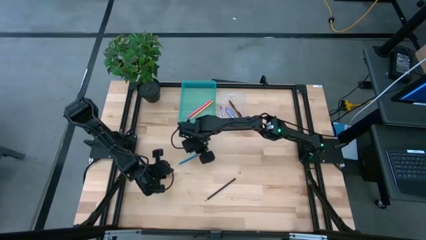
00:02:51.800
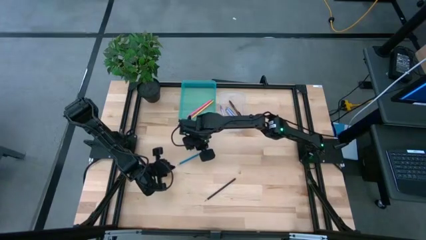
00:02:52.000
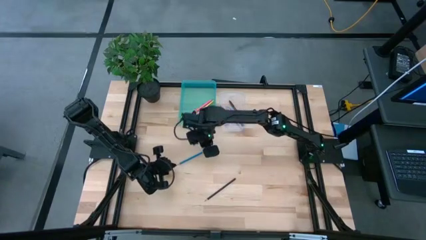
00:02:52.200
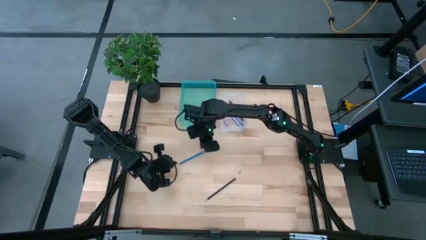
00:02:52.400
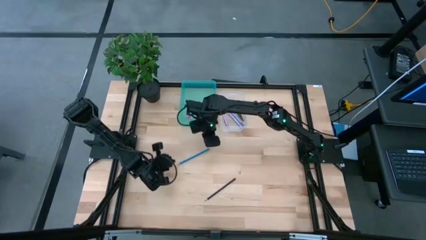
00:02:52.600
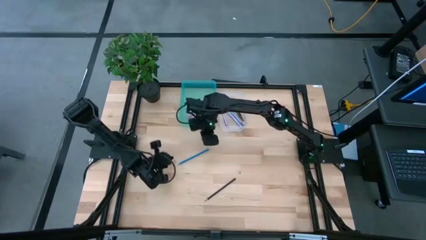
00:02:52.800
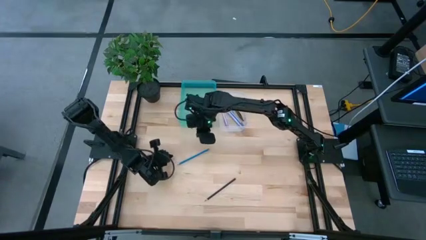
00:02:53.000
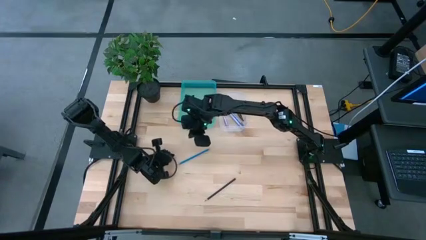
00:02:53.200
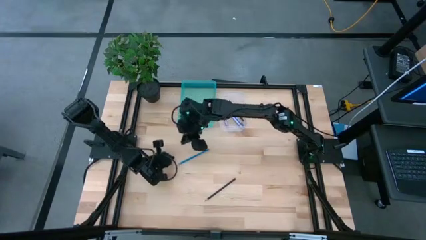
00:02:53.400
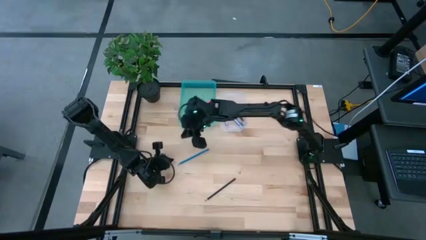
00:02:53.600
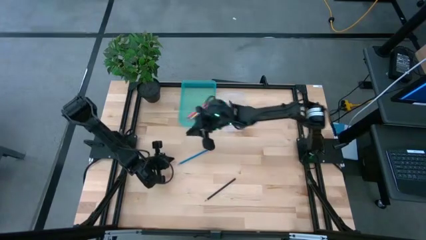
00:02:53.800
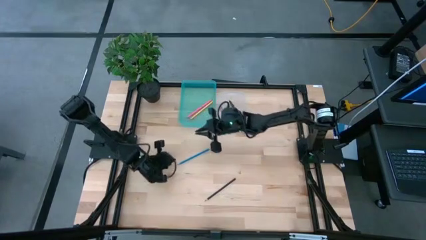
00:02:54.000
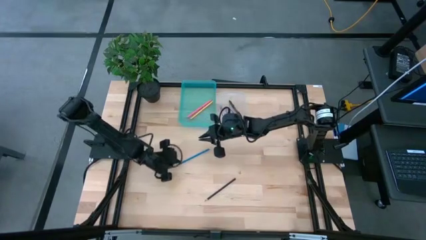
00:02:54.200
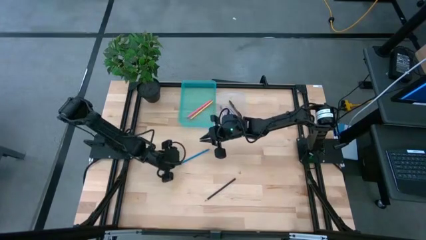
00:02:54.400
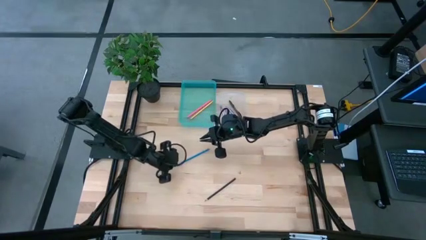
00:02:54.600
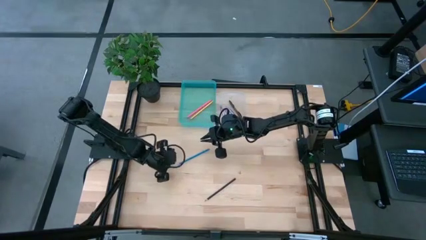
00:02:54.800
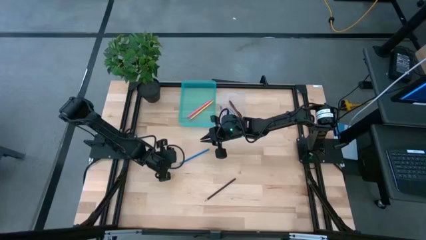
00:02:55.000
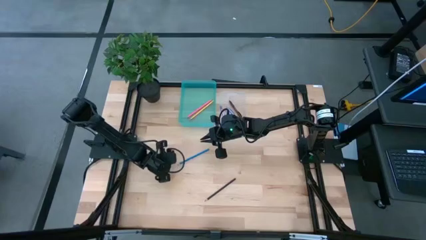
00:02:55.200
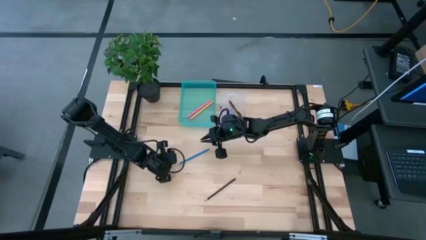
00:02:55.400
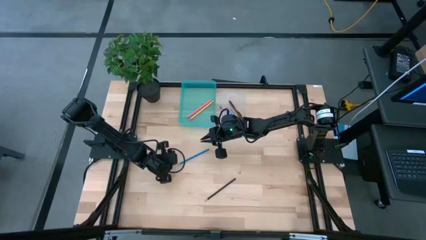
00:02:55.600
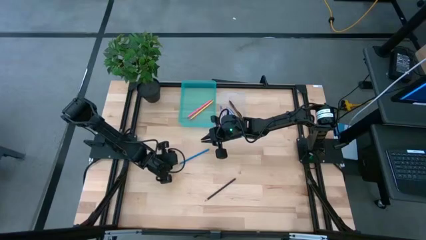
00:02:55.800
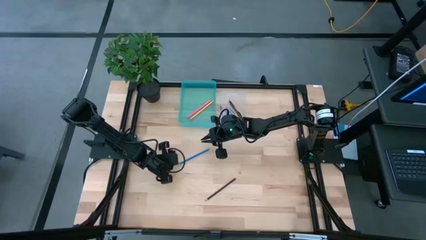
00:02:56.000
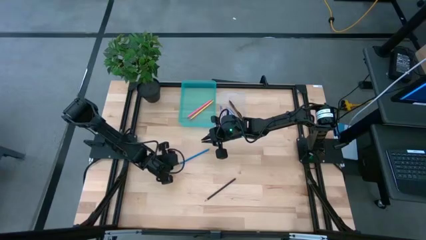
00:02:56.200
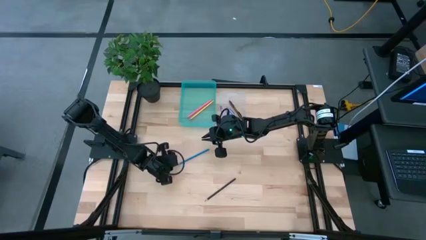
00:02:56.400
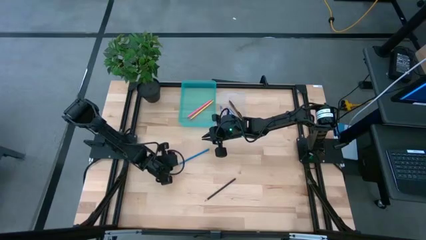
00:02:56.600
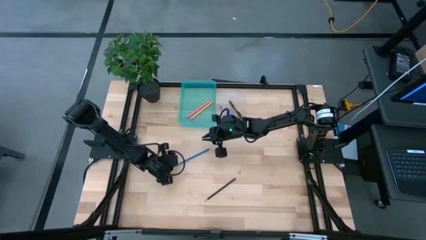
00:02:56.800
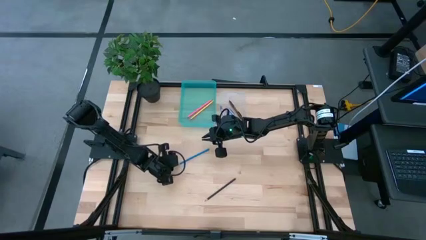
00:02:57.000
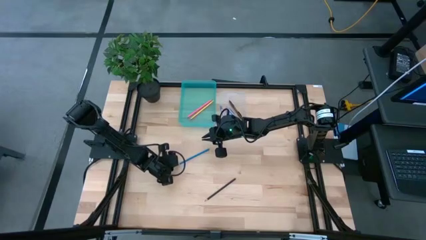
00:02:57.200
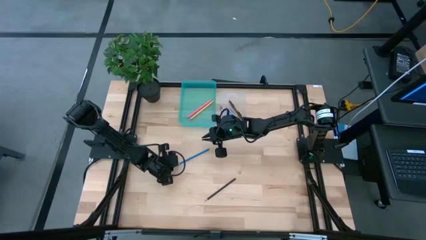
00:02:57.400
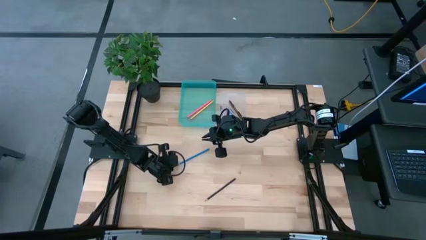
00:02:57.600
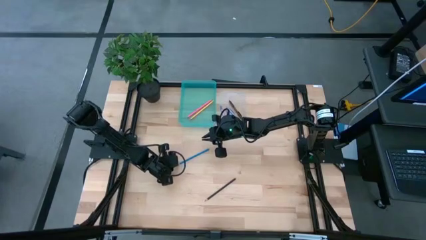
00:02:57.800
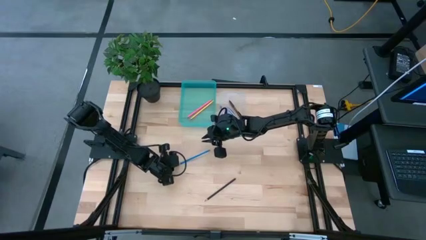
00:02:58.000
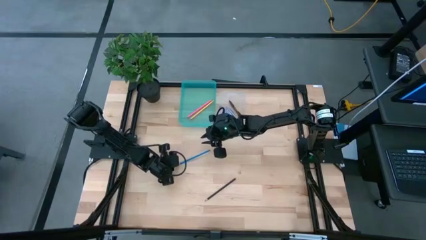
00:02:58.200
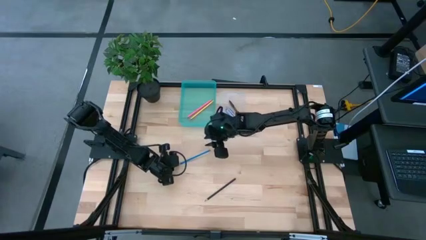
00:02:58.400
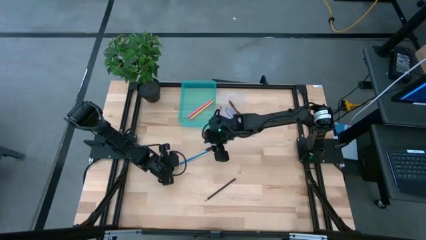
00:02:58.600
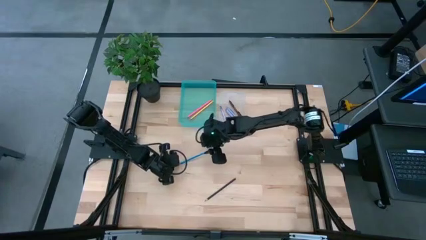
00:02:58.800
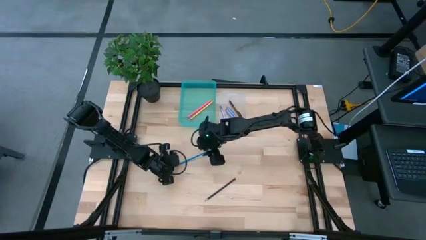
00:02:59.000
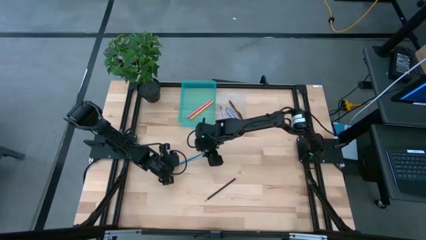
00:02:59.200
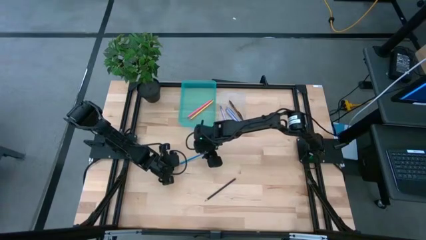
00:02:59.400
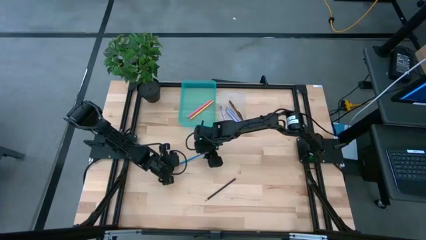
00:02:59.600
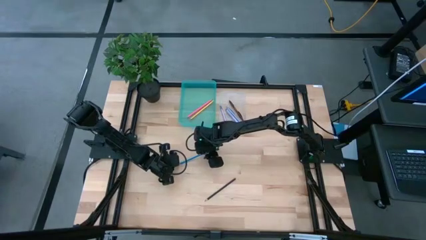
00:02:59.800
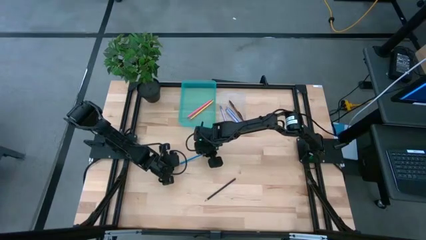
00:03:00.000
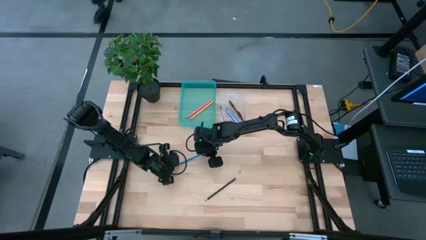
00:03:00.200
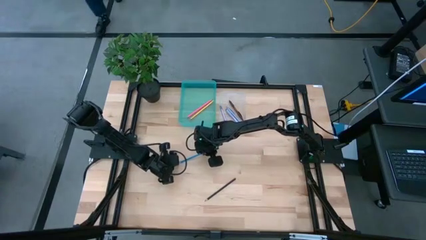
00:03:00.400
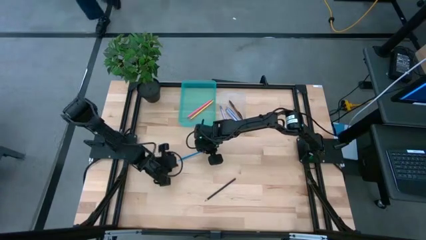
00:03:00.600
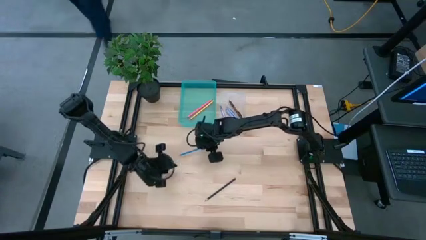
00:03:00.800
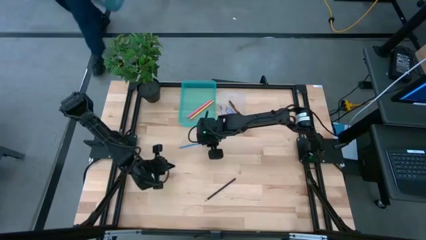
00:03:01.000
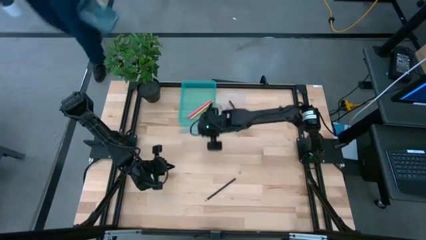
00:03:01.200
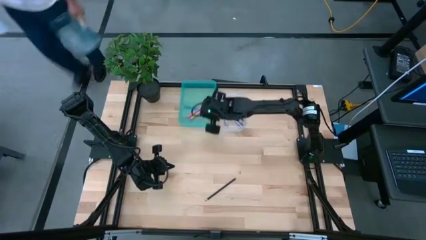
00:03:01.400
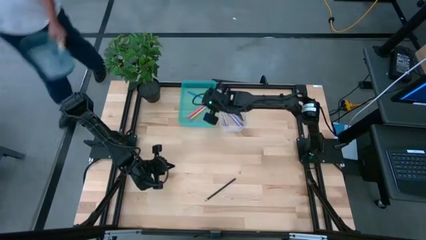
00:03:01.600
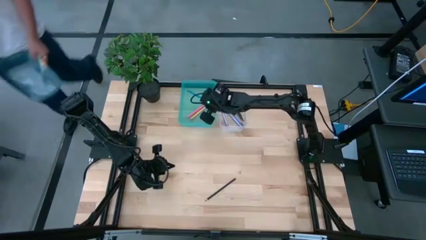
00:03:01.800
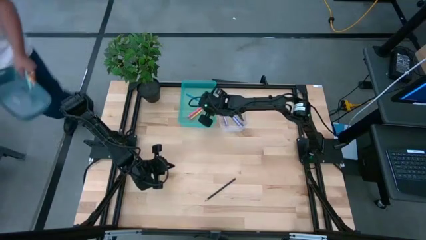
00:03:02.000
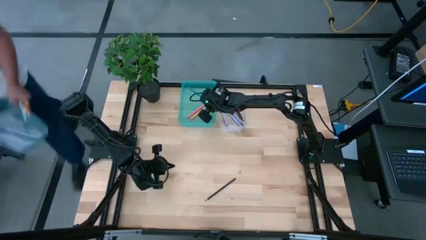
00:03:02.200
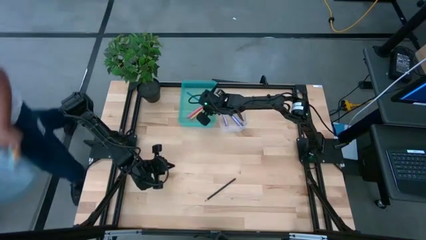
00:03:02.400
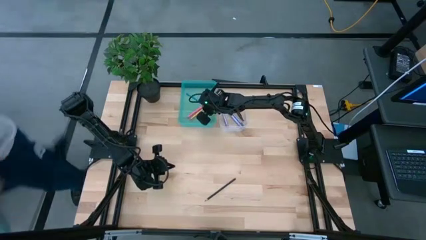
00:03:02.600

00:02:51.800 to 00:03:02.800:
Task: Sort pens & pencils
Put the blue pencil into the blue bin

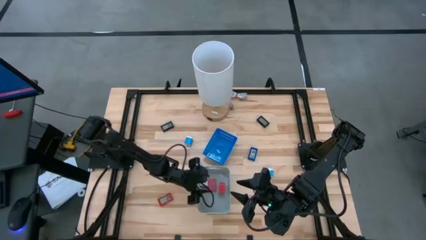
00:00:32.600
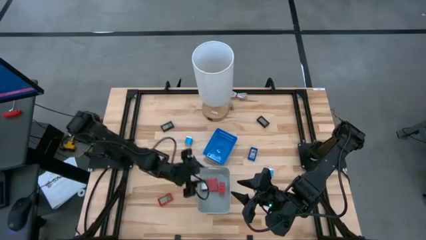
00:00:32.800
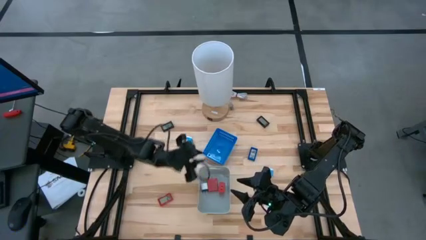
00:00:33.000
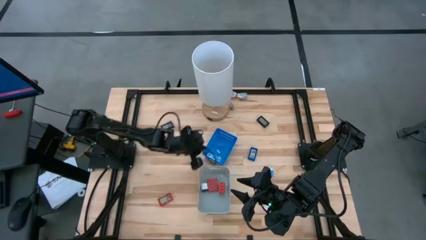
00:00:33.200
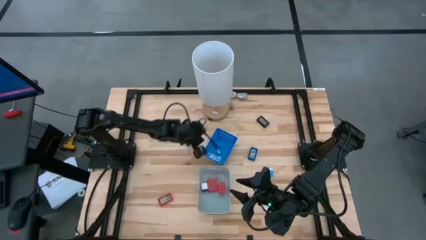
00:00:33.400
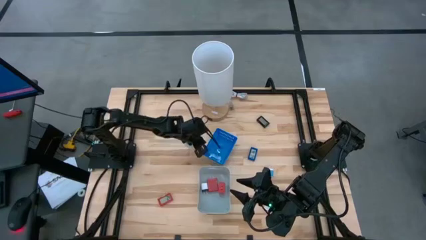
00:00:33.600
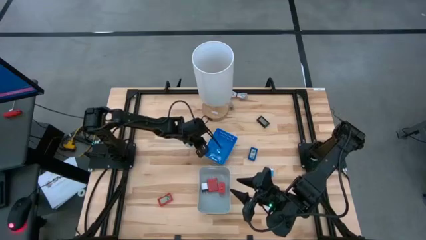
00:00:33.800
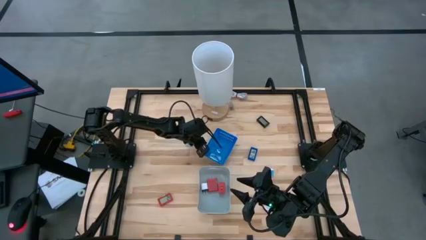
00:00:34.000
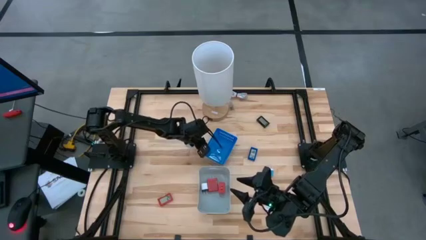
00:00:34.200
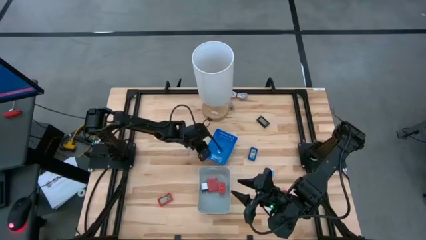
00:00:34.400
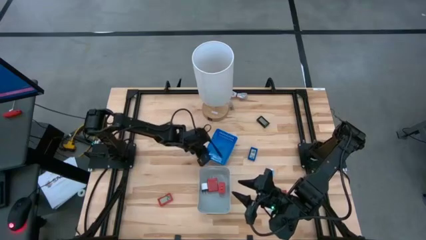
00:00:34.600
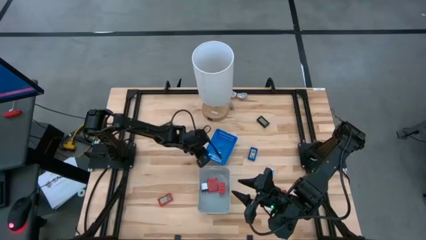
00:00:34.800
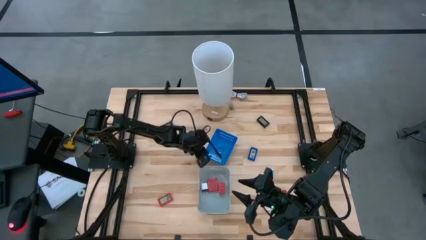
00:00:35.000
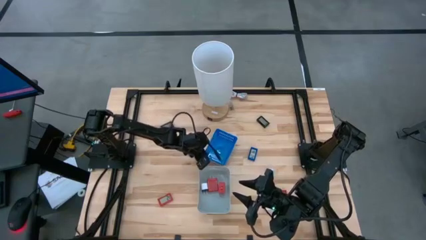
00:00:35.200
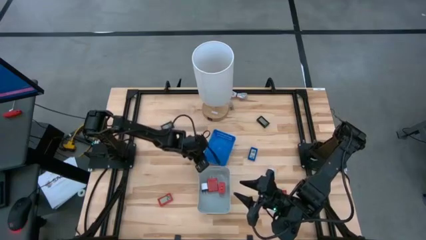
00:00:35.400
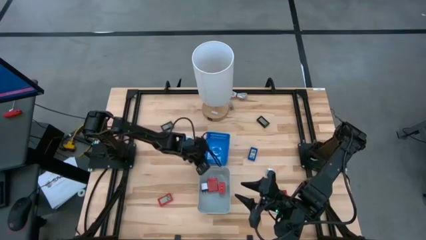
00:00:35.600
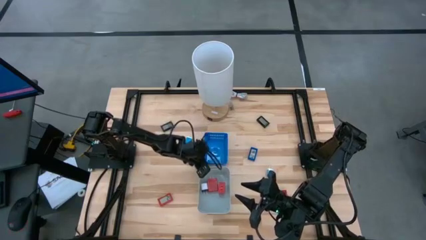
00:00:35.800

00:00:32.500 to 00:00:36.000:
Task: Pick & Place Office items
Adjust the blue bin on the table
